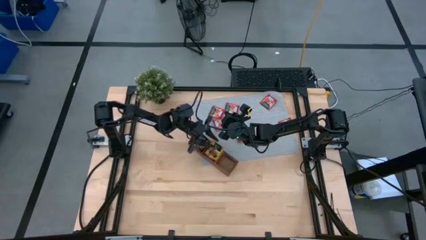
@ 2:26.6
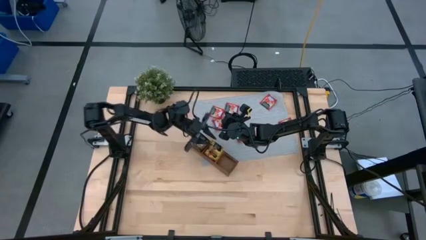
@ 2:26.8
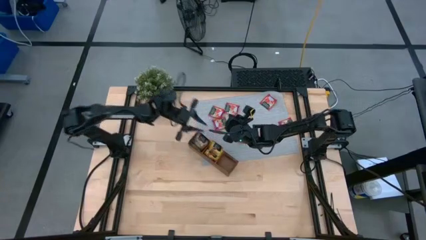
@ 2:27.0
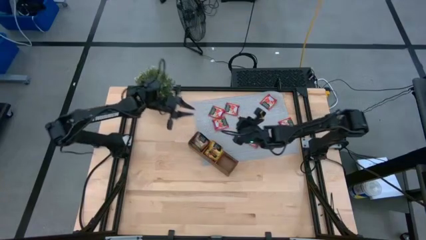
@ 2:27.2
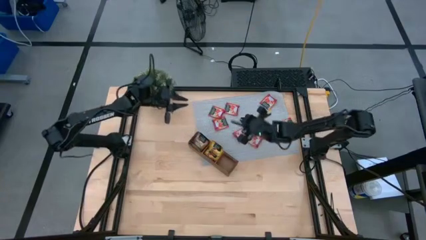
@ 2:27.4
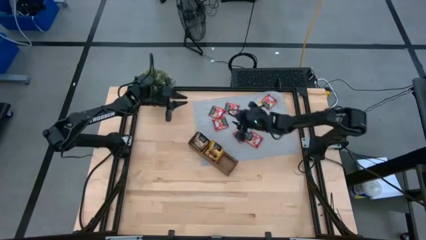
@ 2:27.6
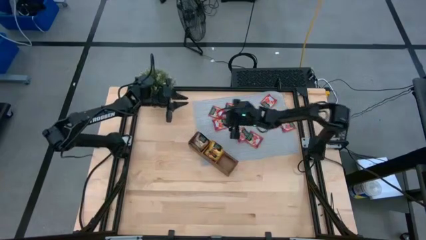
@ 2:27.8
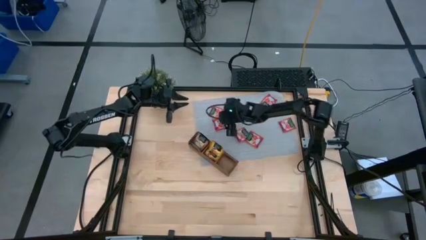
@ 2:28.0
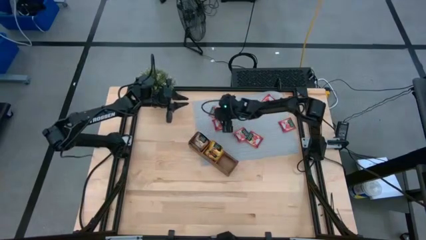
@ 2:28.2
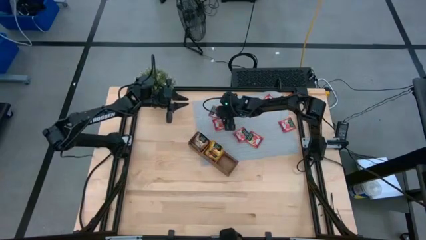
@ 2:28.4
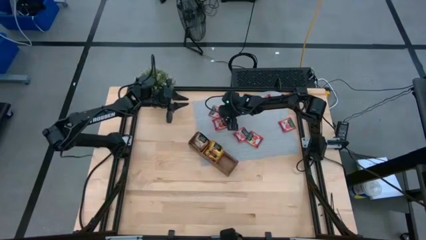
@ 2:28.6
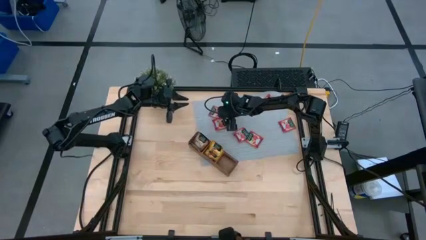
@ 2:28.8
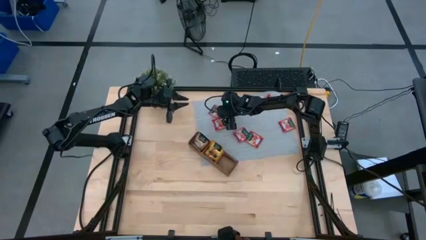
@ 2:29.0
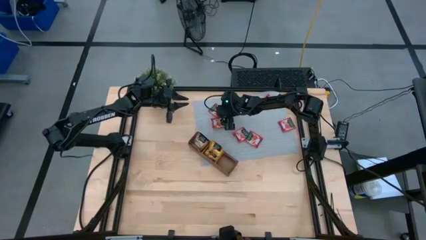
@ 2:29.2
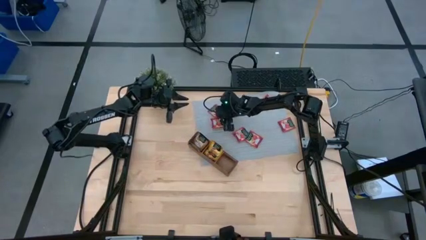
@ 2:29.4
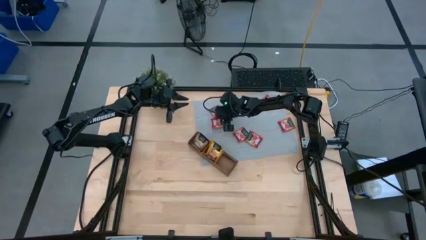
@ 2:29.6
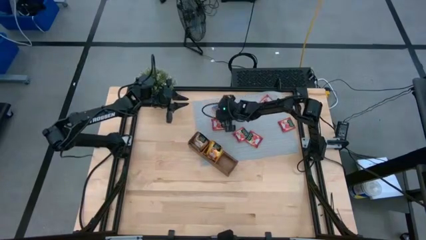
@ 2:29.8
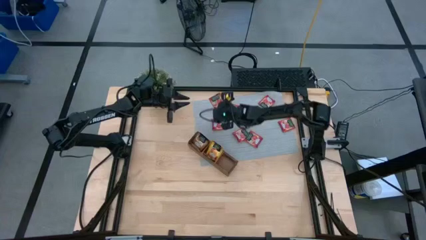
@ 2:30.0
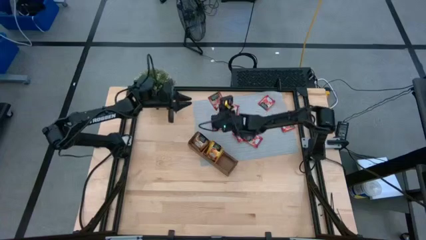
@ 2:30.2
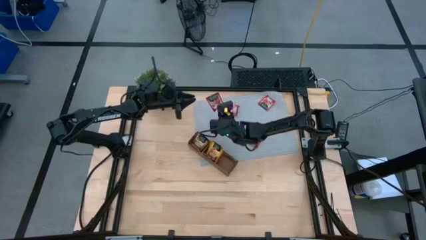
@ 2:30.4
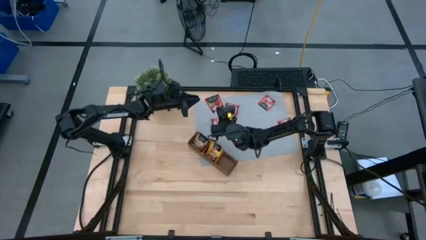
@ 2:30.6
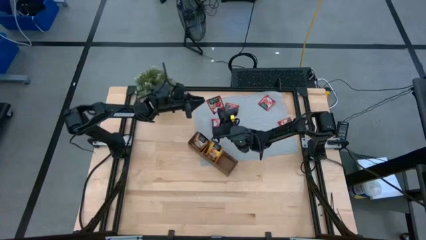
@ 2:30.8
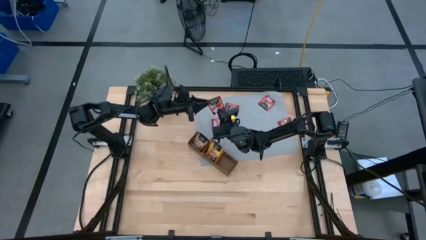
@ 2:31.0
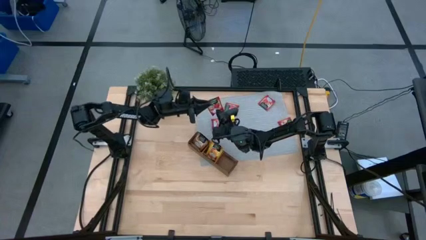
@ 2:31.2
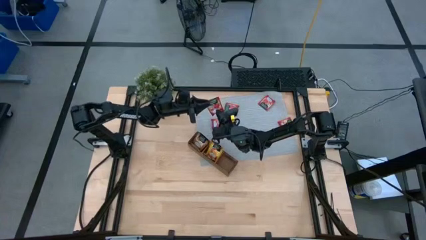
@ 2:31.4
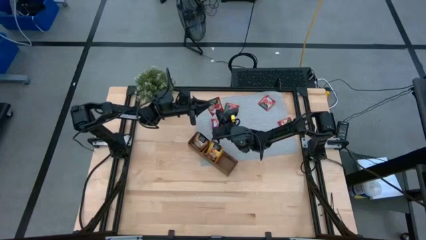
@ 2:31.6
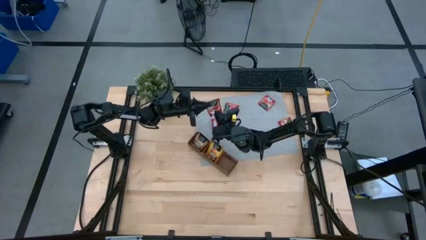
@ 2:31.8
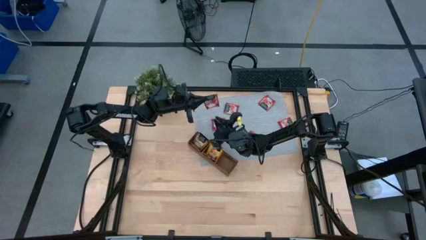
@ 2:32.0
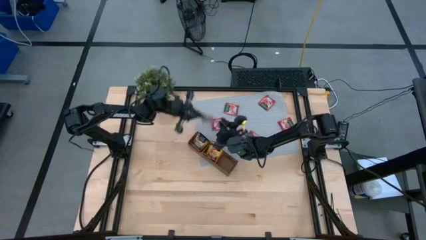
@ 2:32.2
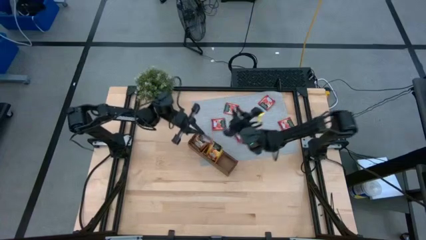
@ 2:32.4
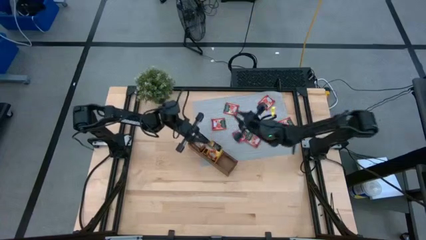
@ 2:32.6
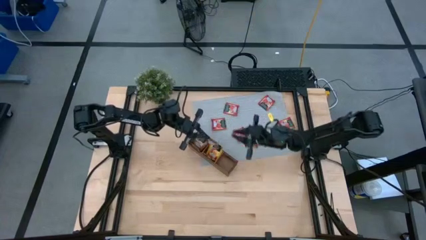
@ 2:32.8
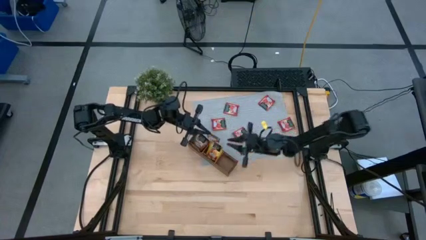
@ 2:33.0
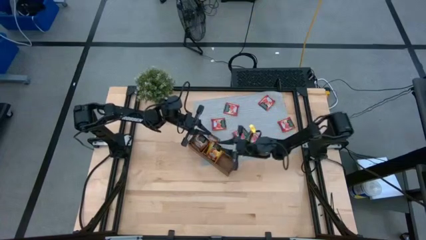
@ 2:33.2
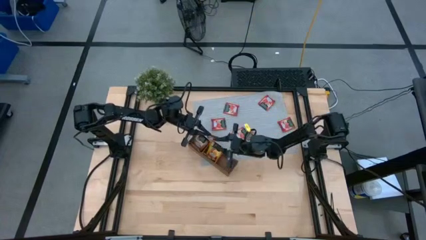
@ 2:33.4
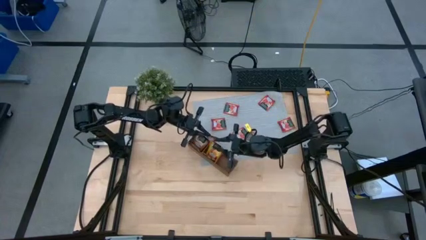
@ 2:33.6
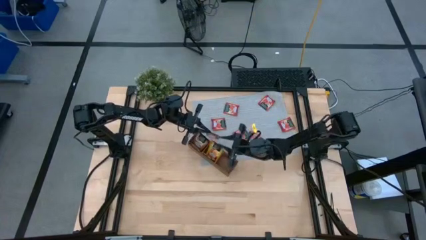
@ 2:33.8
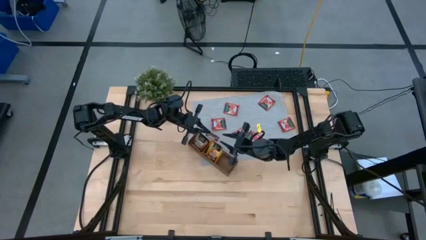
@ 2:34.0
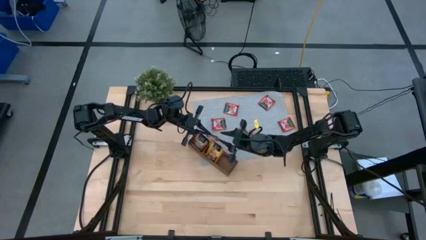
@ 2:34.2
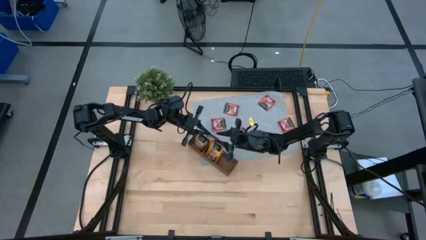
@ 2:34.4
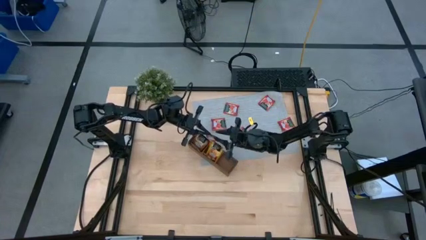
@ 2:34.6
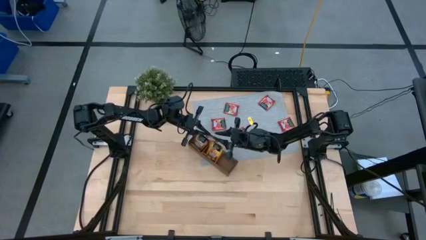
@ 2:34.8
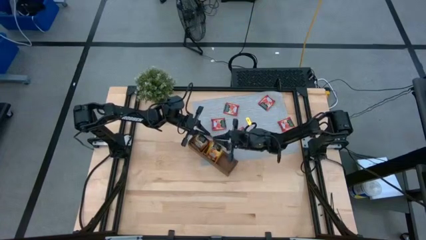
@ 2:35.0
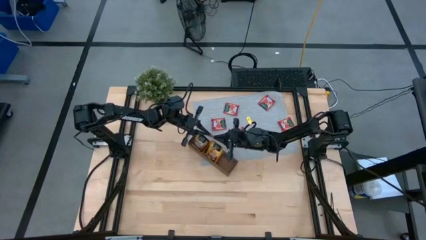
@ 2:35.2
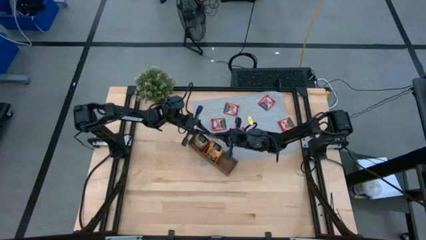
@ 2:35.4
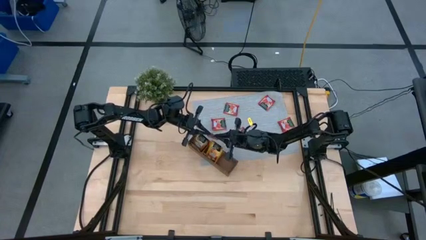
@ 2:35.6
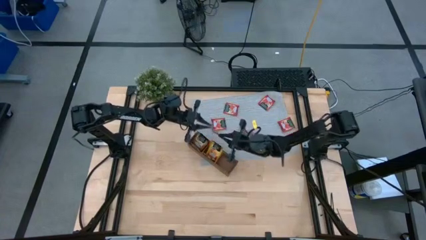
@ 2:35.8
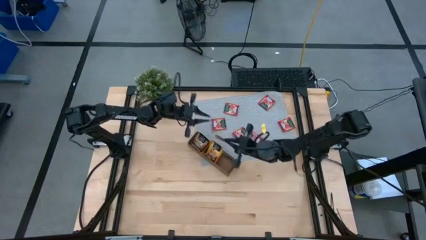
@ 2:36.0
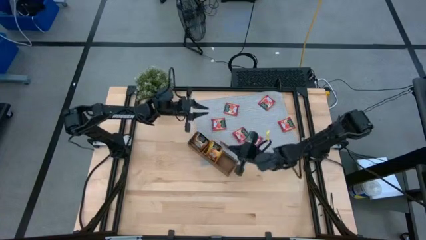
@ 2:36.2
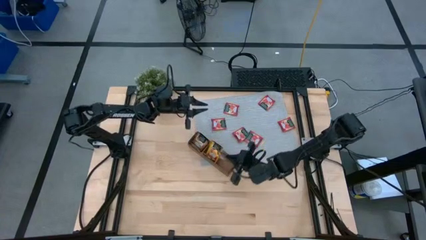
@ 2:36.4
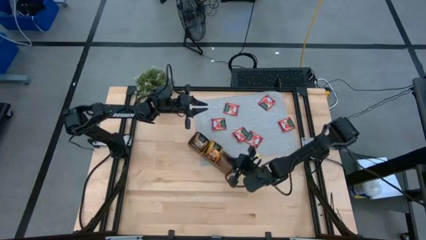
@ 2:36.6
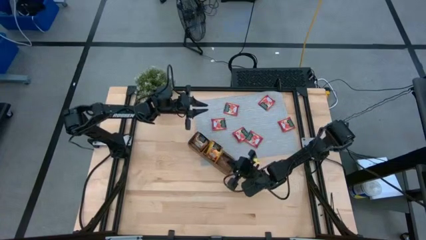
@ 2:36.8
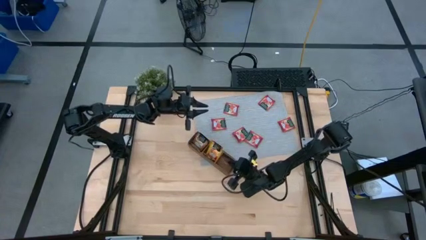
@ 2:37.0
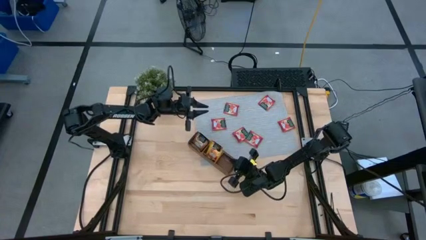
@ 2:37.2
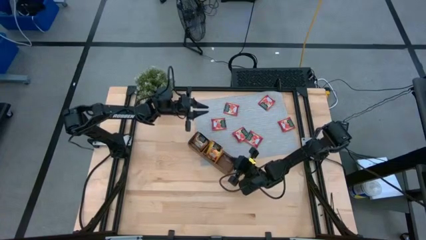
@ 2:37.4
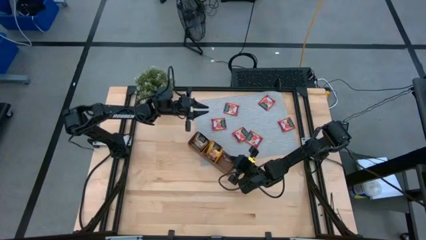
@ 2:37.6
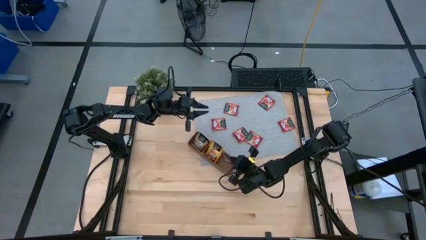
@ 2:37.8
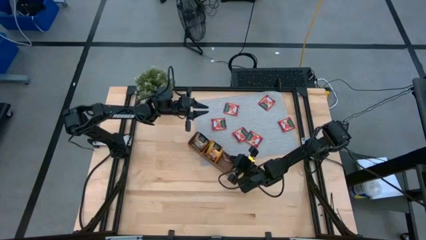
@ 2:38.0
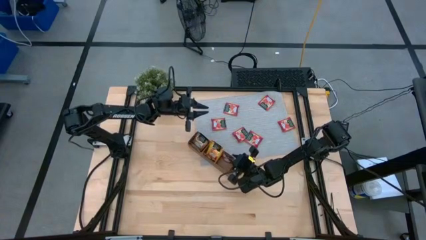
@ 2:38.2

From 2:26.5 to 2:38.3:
Task: Pick & Place Tea
Put the red tea bag into the right section of the wooden organizer

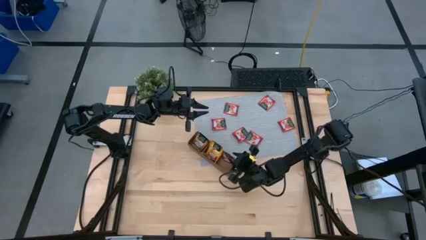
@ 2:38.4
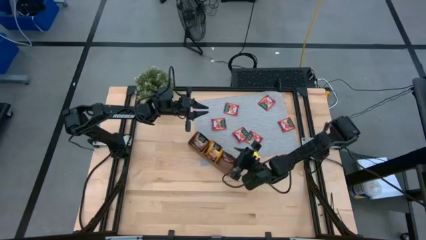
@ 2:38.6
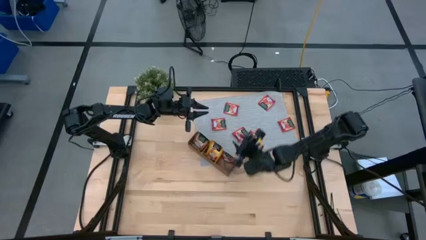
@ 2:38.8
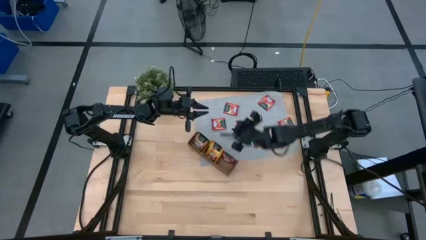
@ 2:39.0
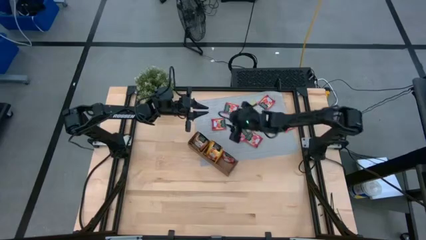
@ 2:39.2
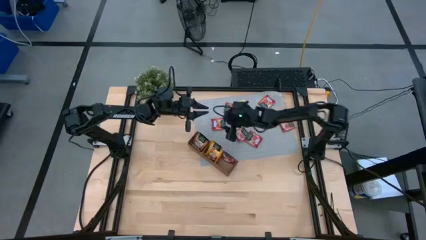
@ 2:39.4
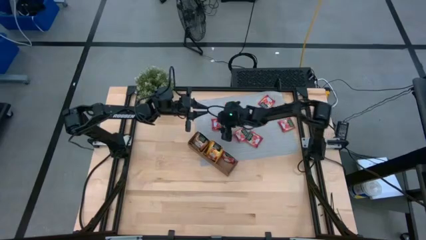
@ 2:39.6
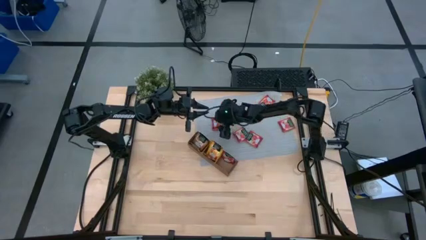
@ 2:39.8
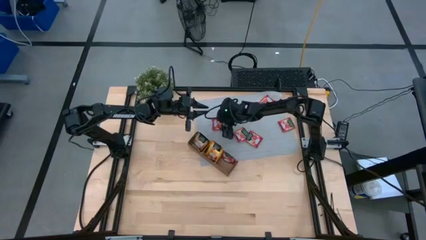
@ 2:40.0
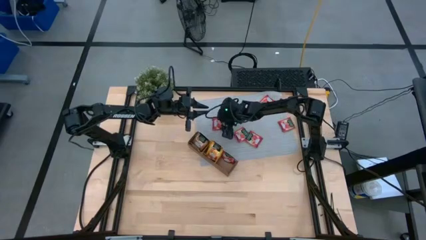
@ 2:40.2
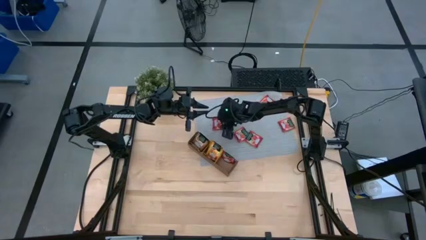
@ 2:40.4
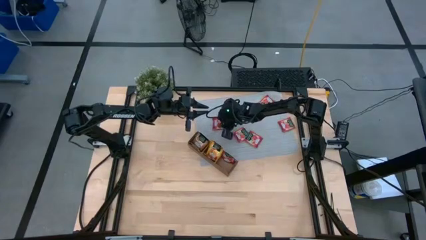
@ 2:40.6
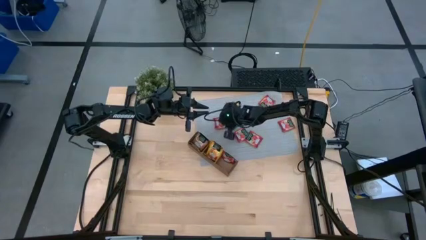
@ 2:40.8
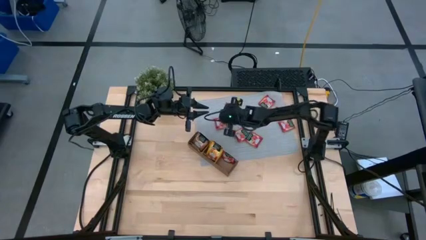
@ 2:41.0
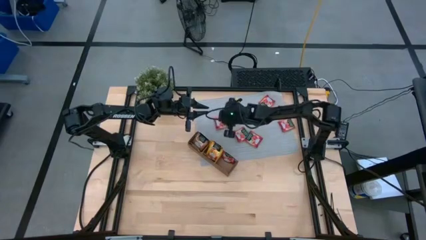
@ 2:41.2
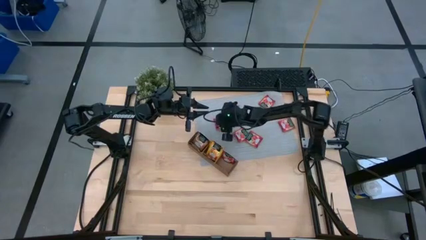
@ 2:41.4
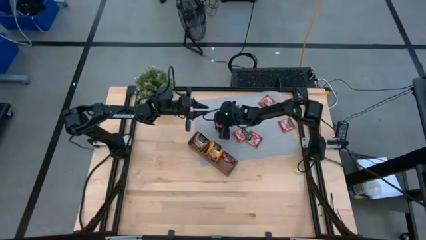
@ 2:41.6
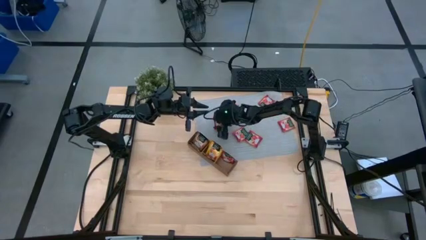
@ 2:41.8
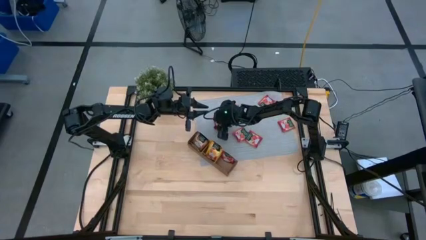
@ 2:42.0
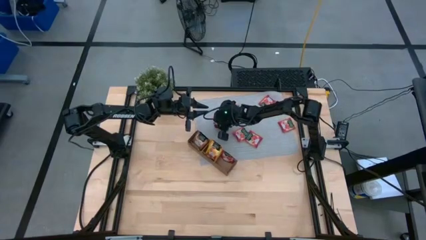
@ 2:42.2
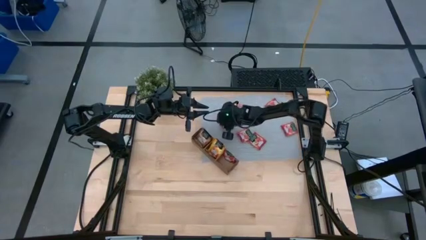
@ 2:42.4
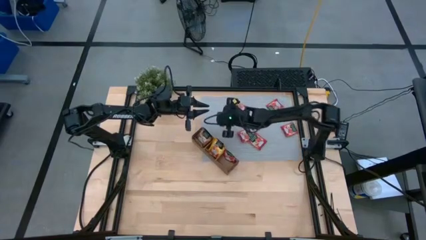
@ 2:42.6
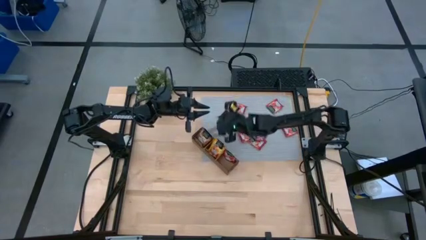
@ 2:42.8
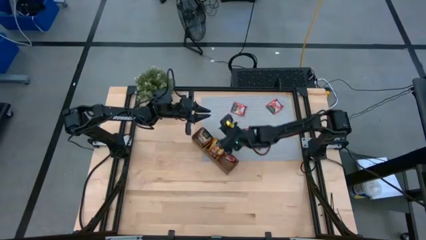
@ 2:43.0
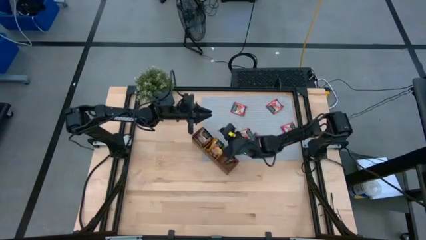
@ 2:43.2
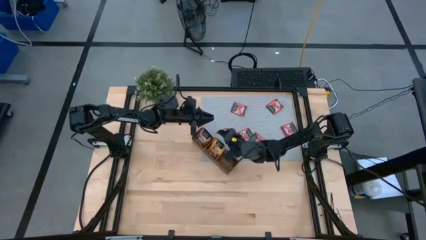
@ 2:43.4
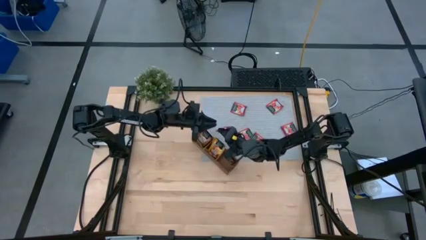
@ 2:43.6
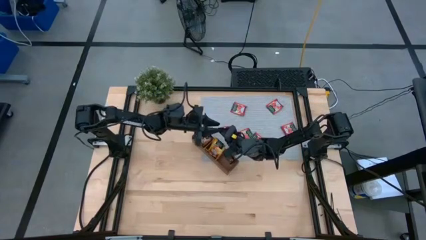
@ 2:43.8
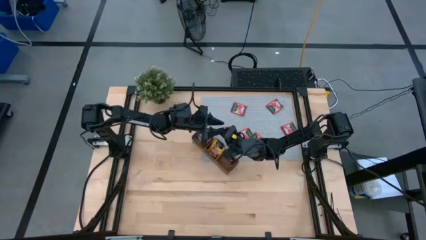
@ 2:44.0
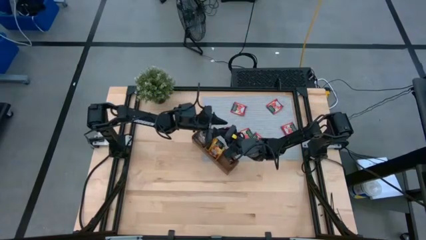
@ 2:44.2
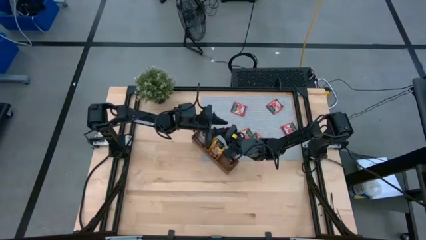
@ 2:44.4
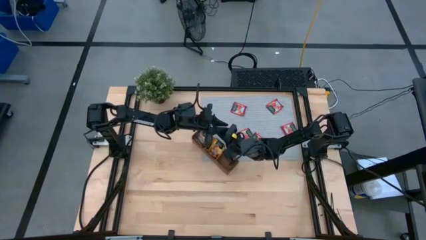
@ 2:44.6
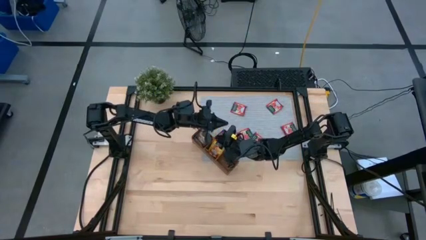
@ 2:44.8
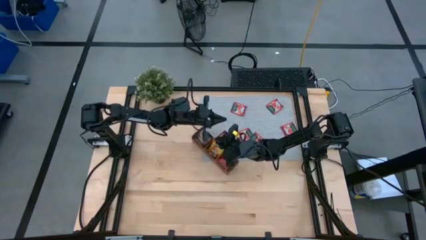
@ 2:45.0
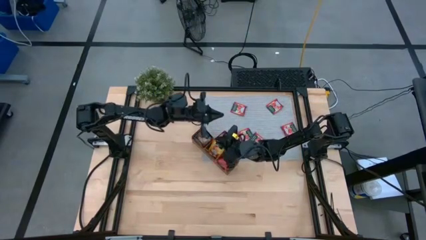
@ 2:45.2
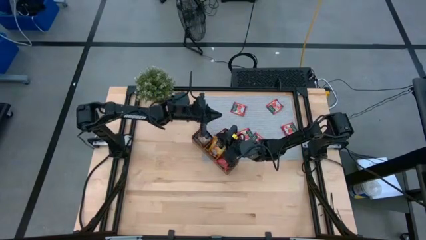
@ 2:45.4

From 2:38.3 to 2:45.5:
Put the red tea bag into the right section of the wooden organizer
